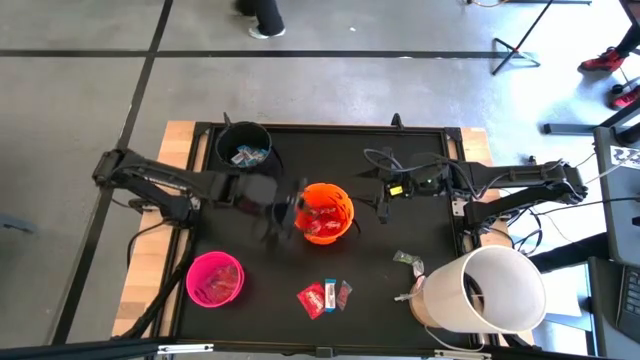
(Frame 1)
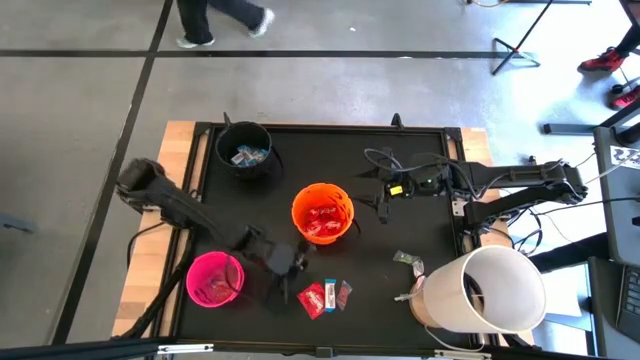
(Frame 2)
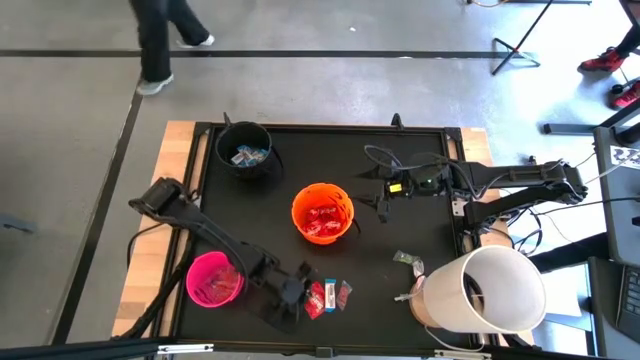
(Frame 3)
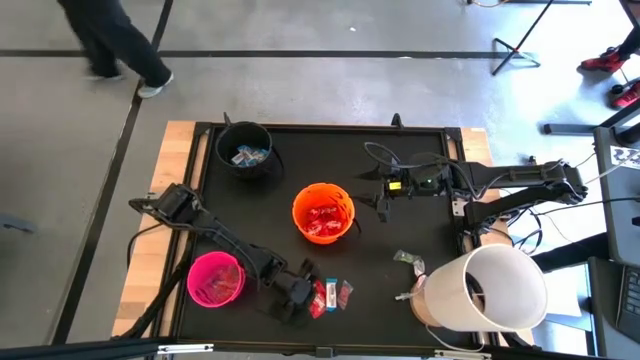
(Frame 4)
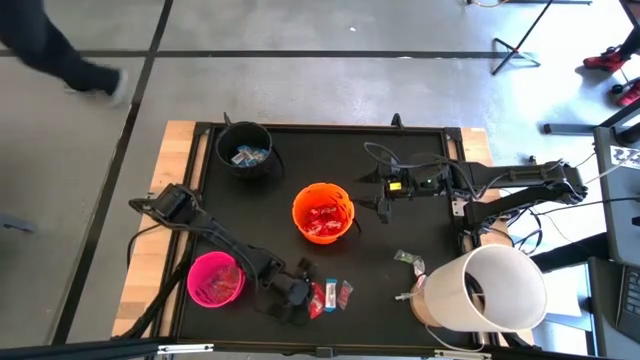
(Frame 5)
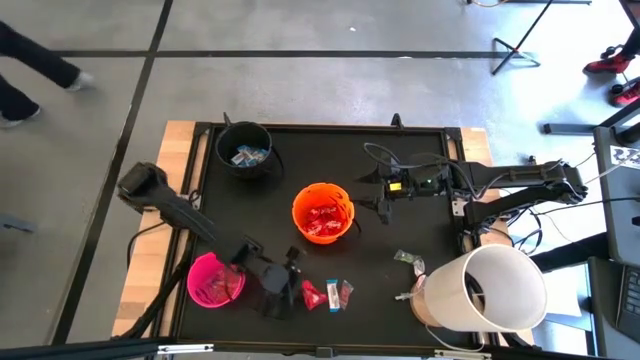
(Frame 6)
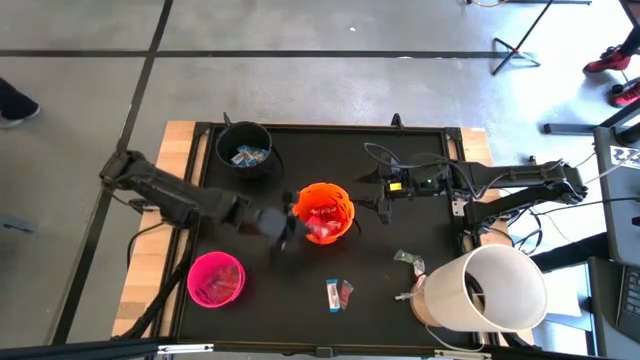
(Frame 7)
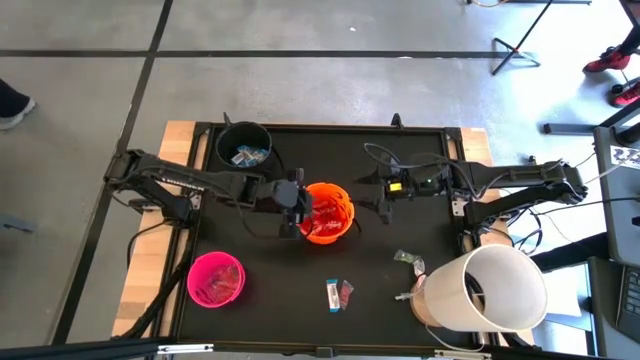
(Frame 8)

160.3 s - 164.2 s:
Task: Sort candy
Put the red candy into the orange bucket

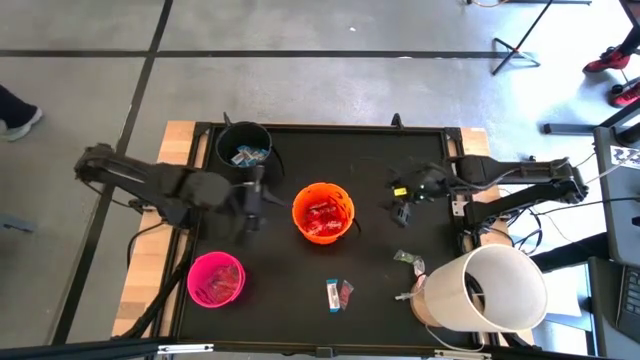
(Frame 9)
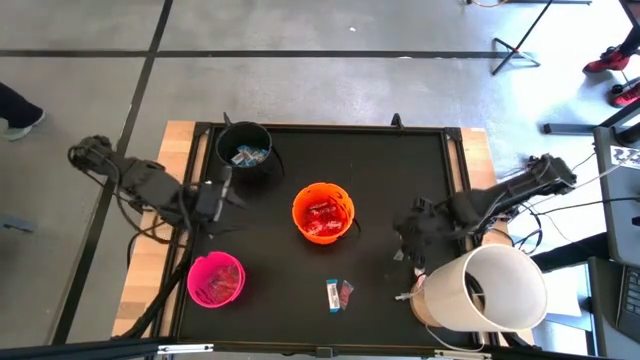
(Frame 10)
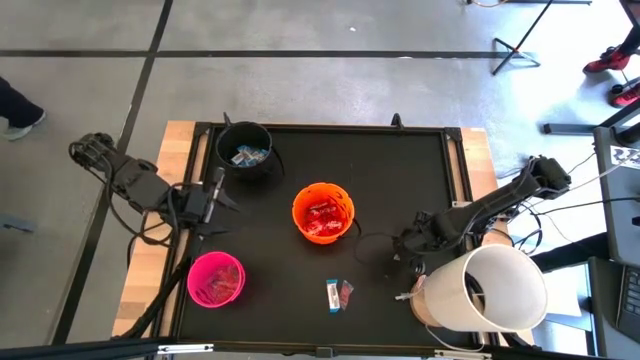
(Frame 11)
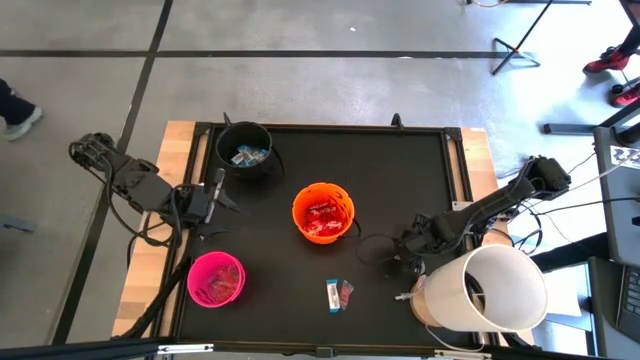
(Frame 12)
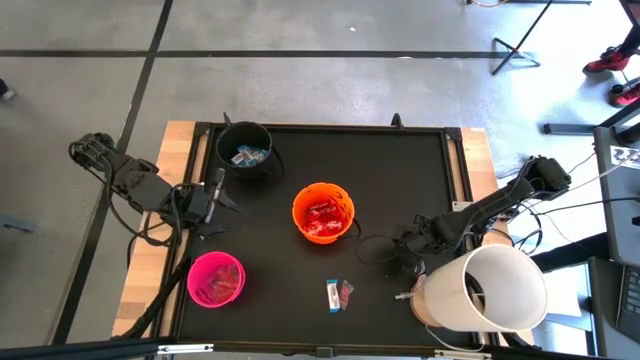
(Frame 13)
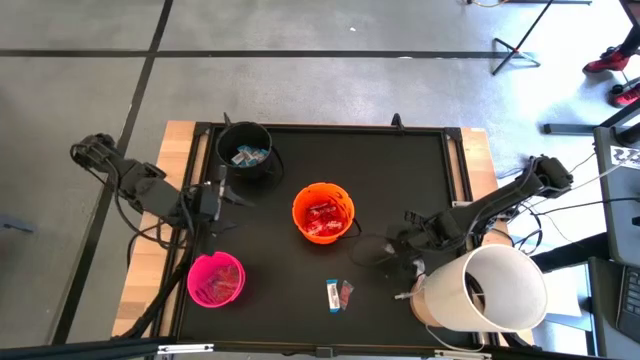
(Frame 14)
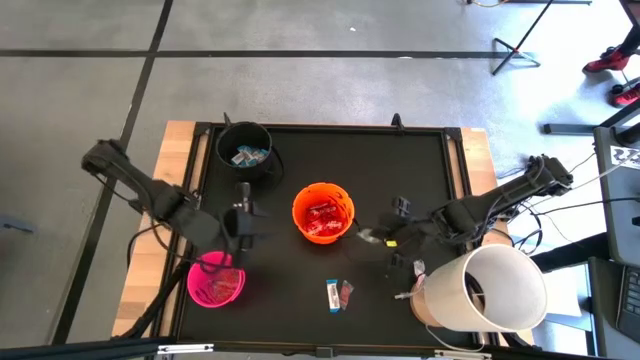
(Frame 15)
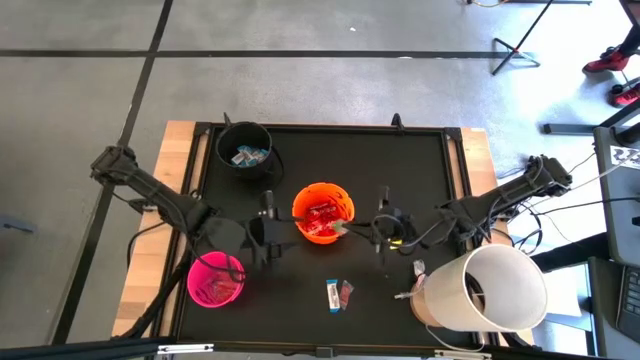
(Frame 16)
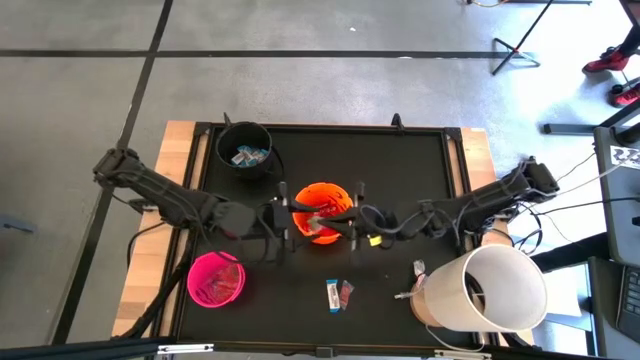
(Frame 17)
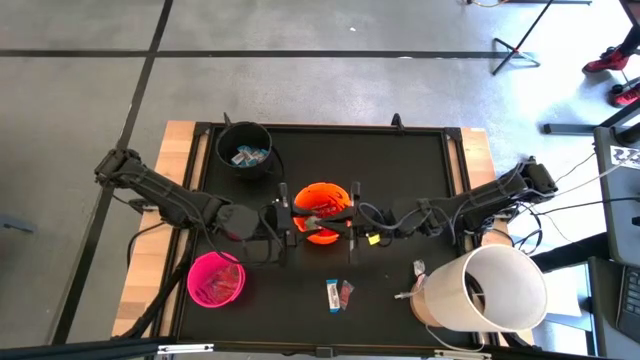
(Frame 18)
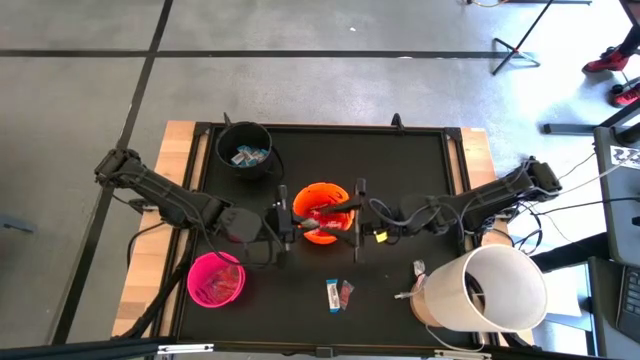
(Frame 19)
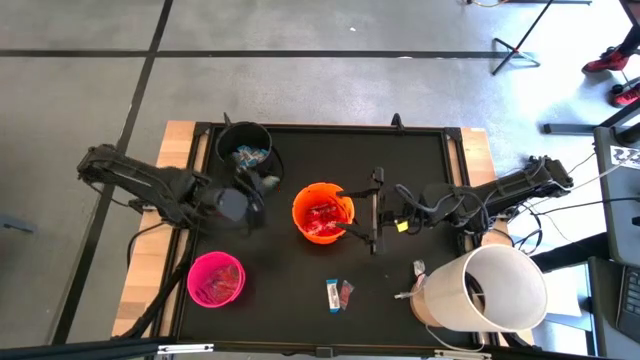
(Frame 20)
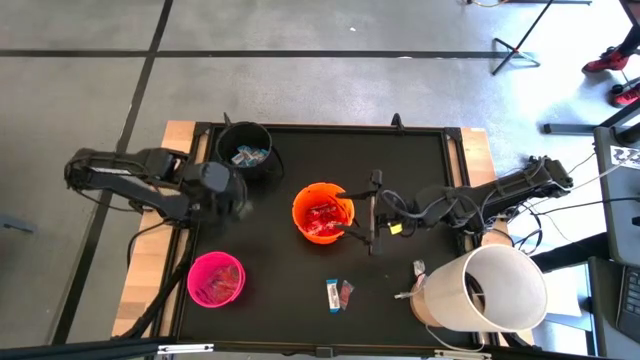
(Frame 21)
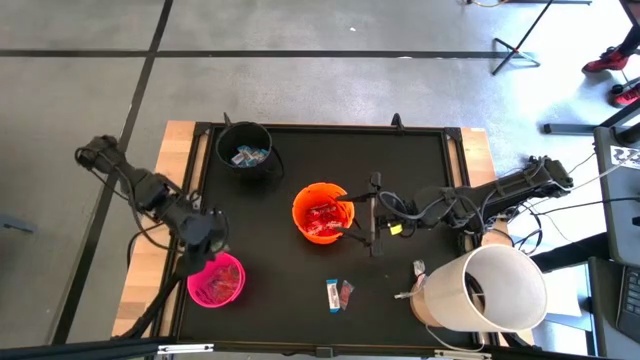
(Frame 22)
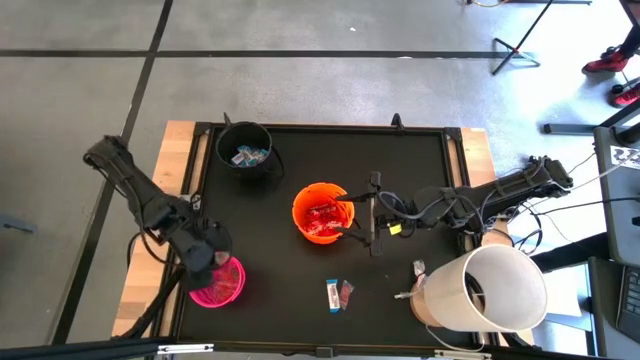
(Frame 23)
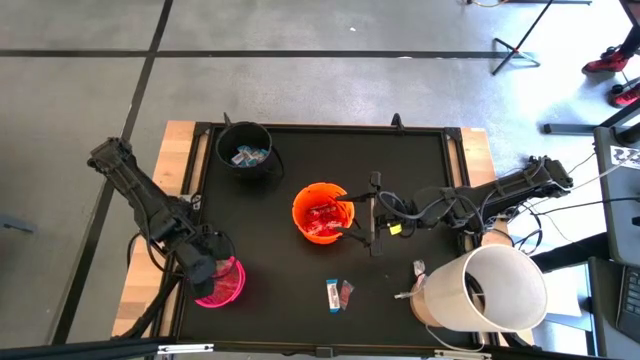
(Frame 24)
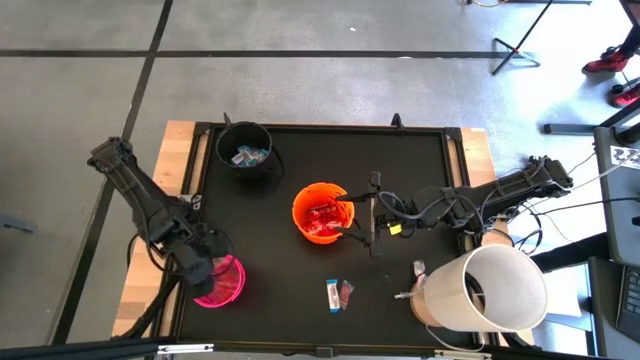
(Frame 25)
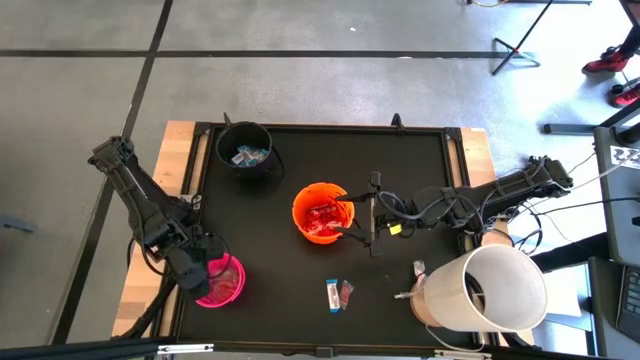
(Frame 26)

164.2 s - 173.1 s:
Put the transparent candy into the pink bucket

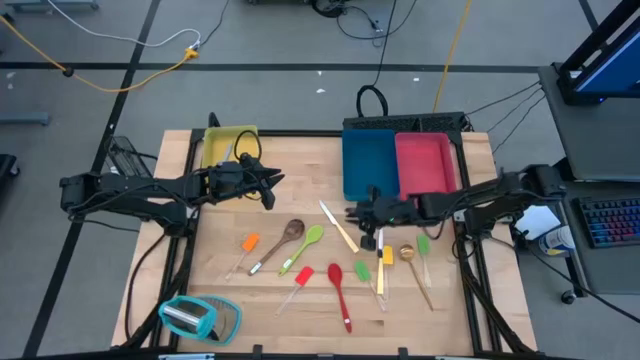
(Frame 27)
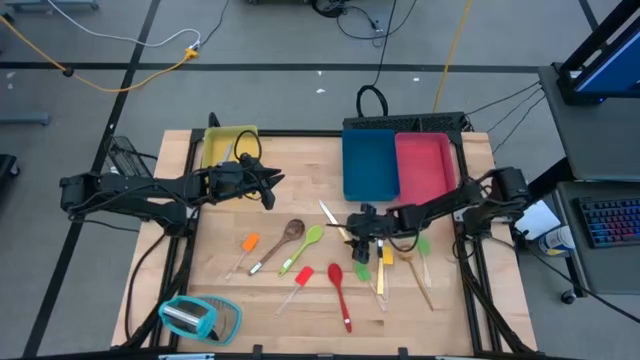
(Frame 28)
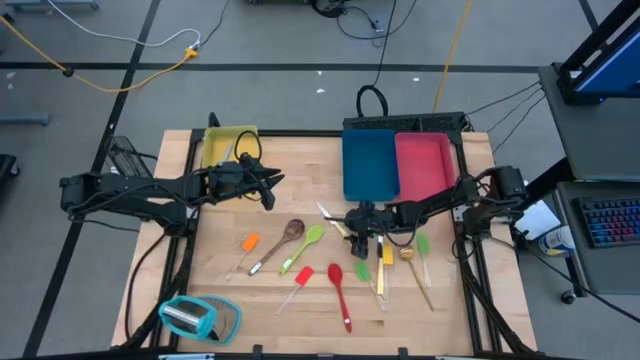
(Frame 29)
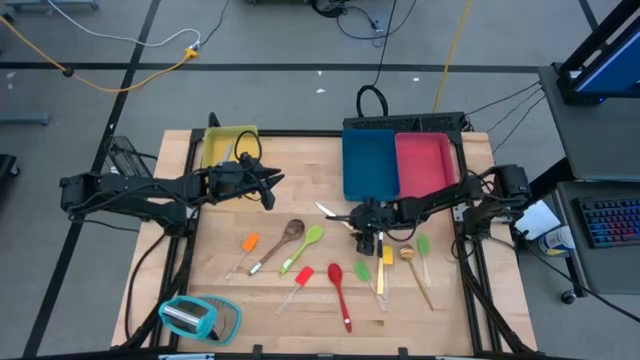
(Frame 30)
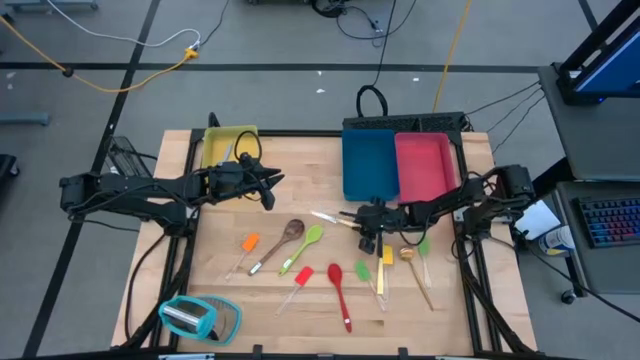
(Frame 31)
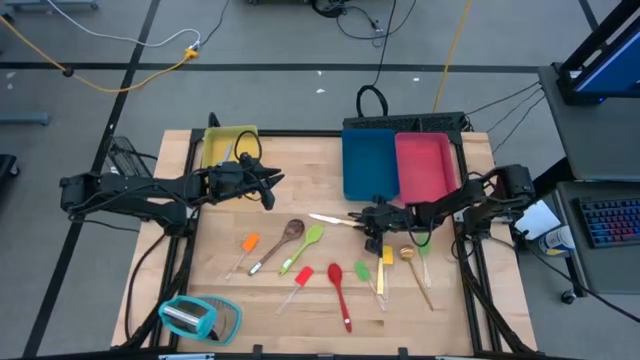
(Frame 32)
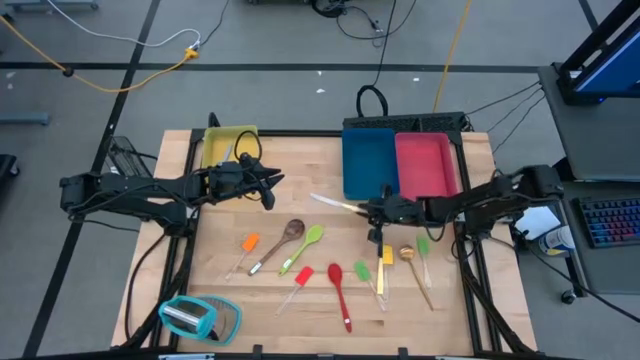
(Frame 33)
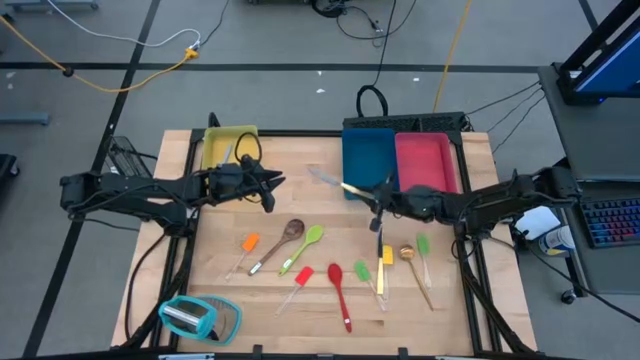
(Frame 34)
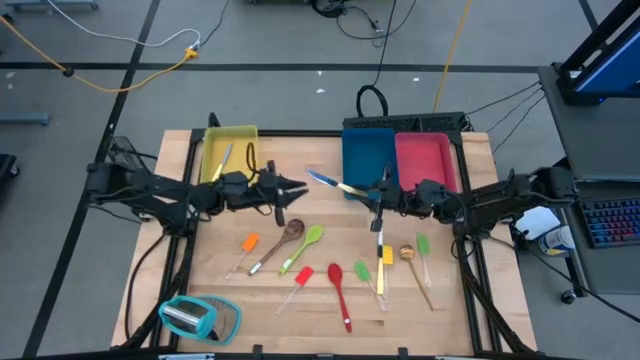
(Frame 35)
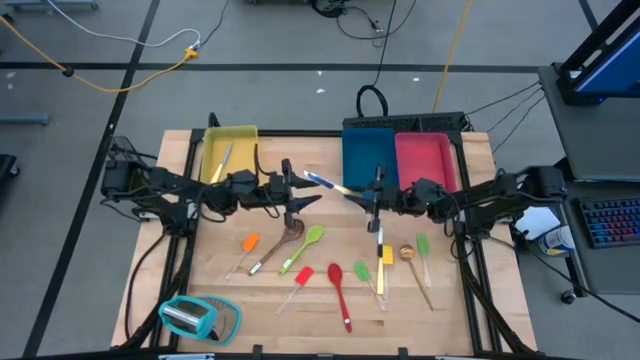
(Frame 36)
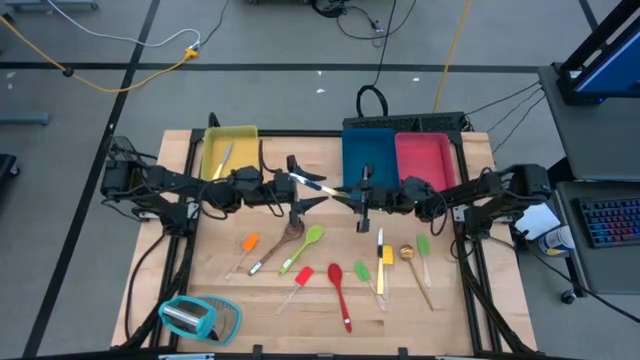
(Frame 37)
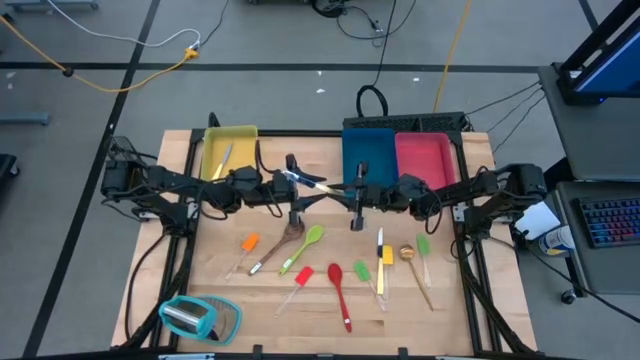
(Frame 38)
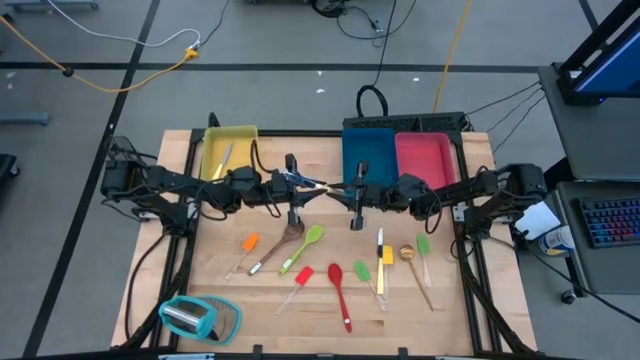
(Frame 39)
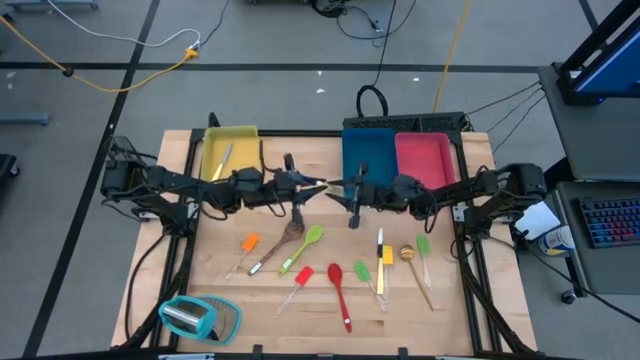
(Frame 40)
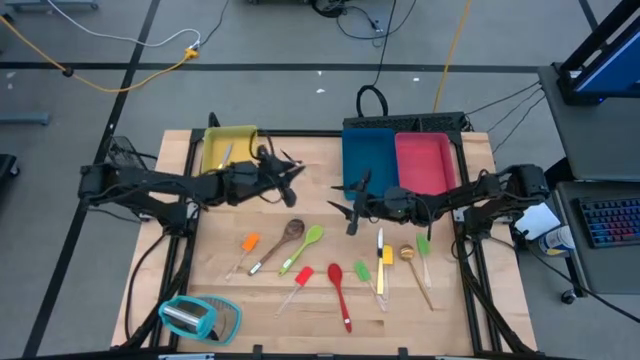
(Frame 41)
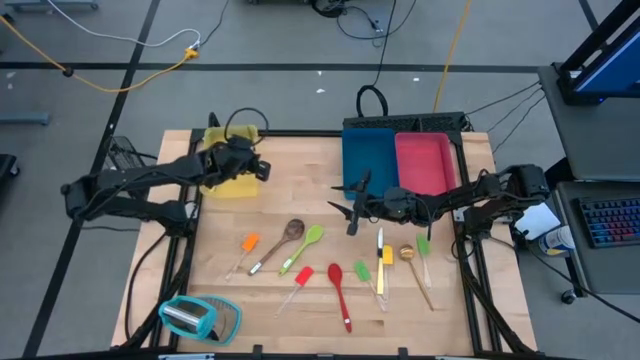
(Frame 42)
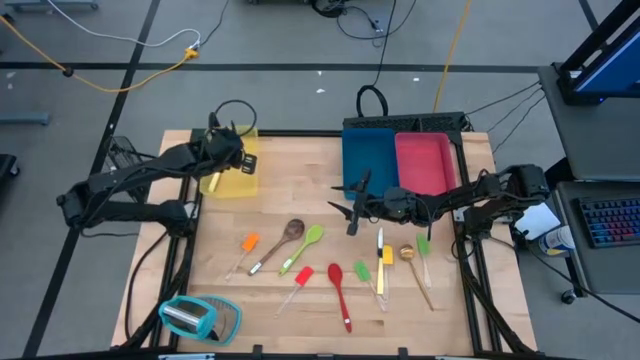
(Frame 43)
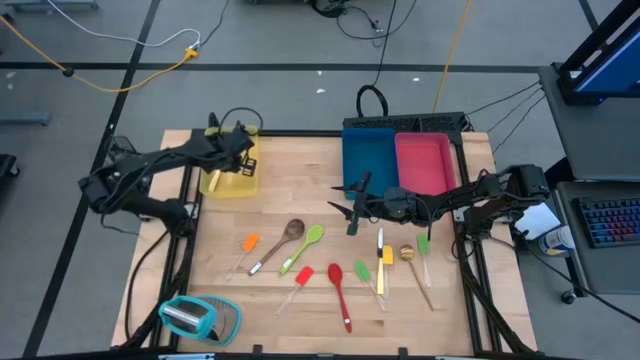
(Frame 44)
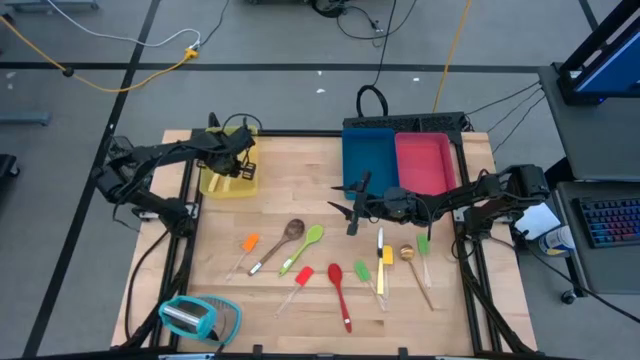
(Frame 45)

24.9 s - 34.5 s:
Task: Pick & Place Kitchen Items
Put the yellow knife into the yellow bin
